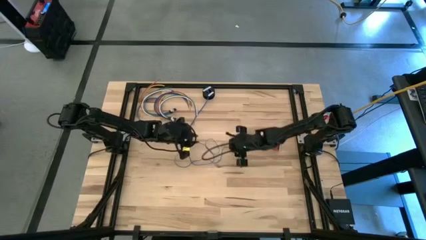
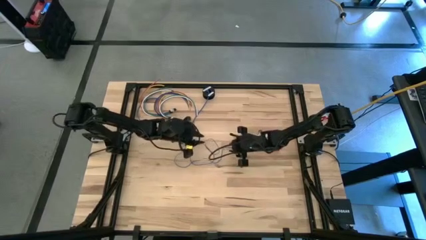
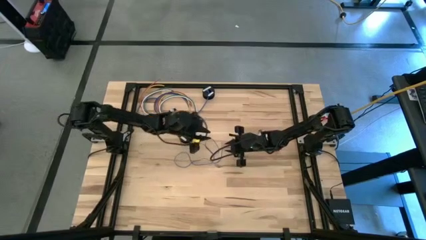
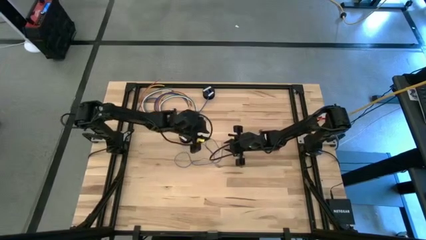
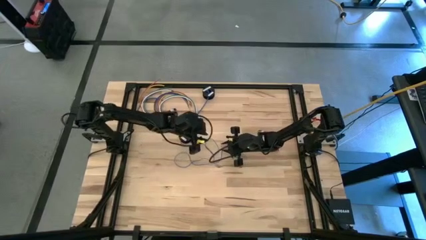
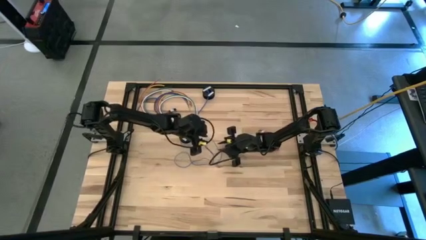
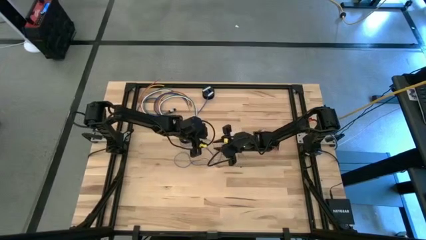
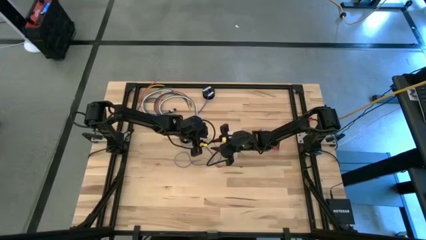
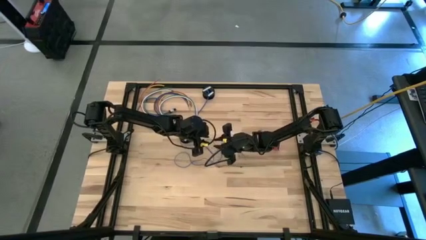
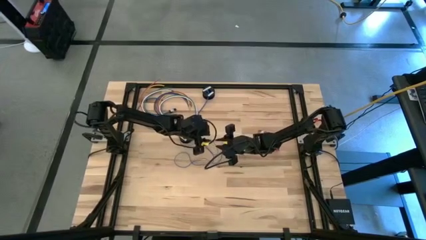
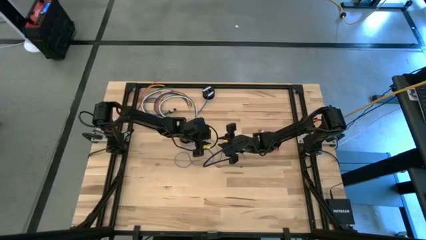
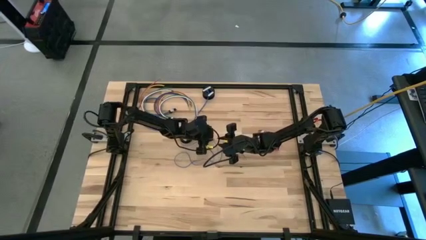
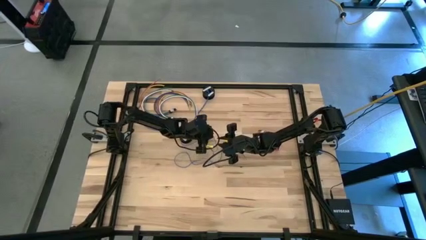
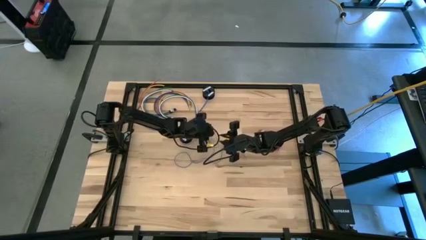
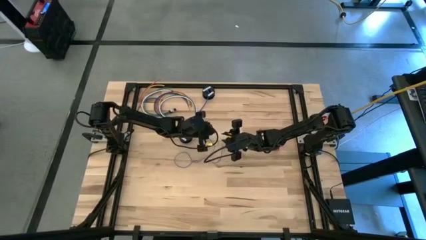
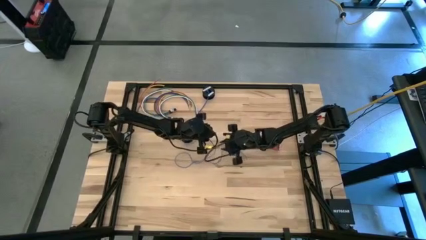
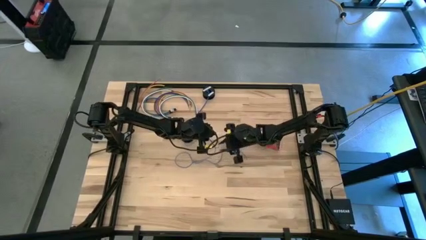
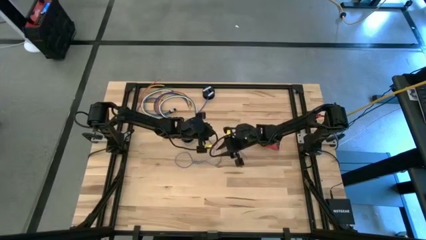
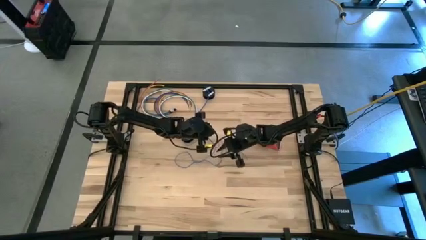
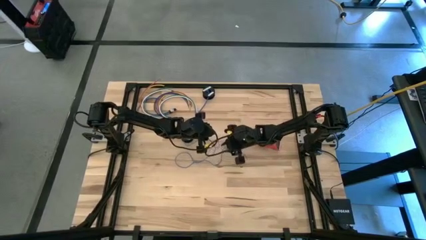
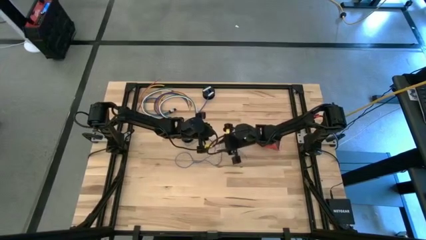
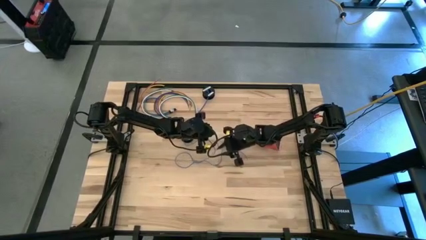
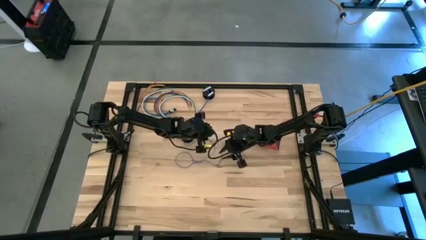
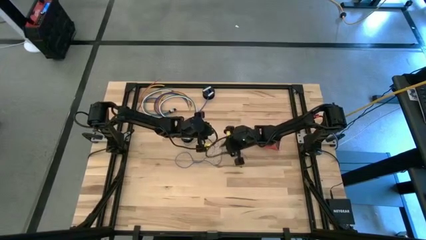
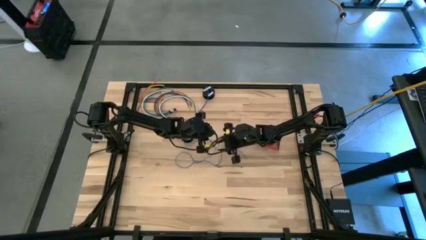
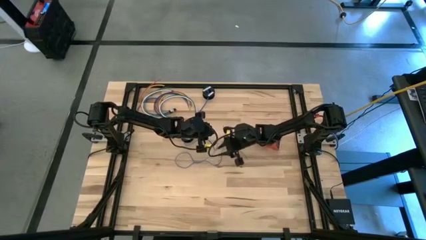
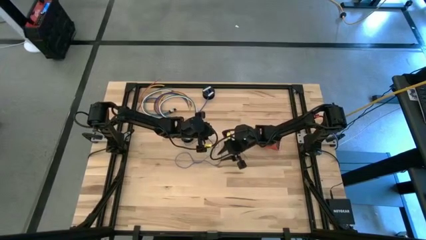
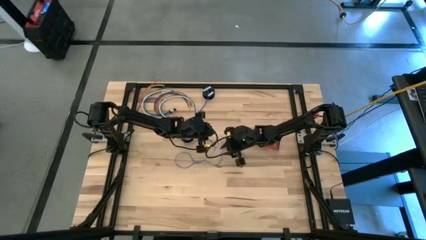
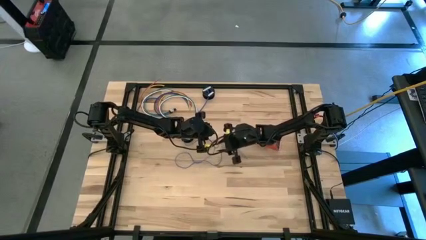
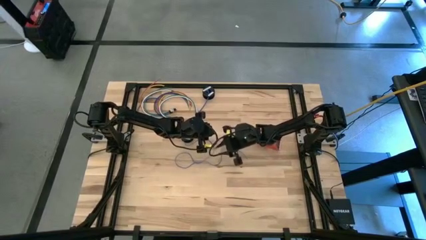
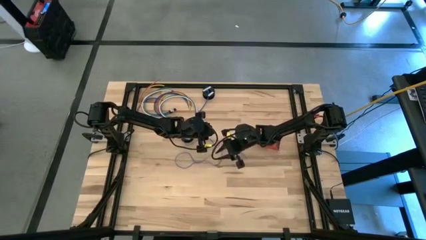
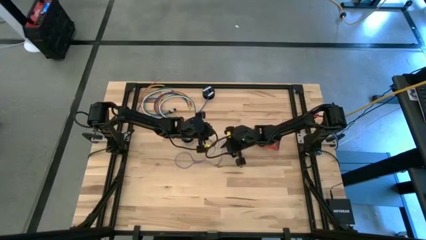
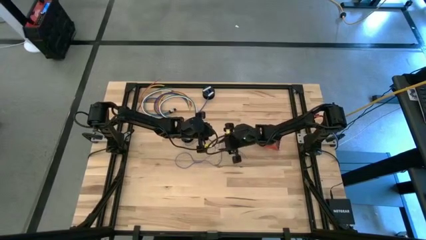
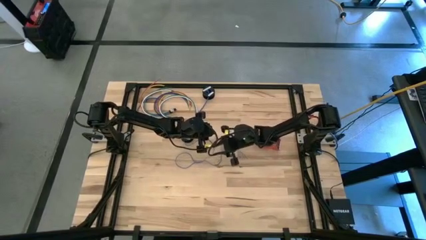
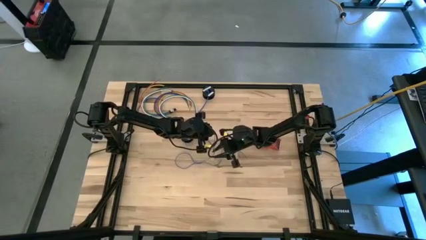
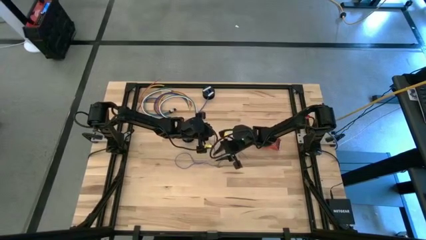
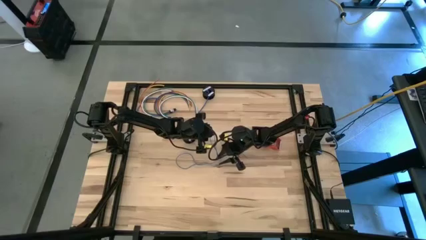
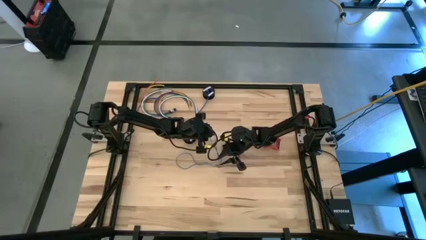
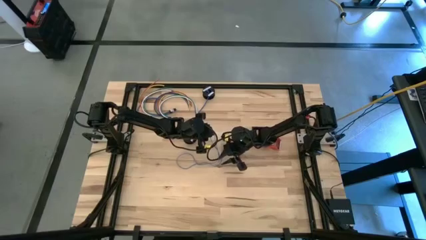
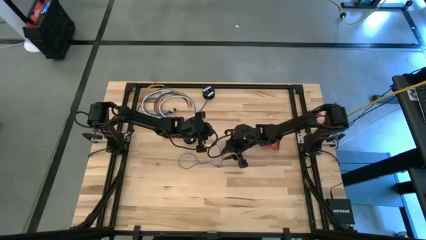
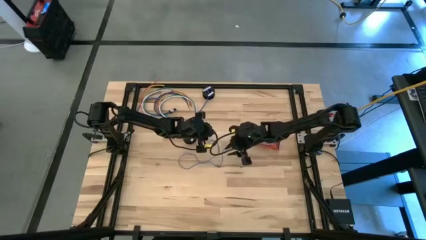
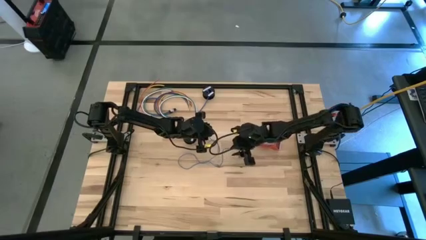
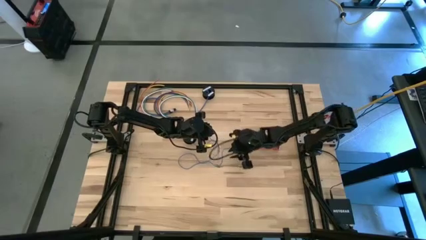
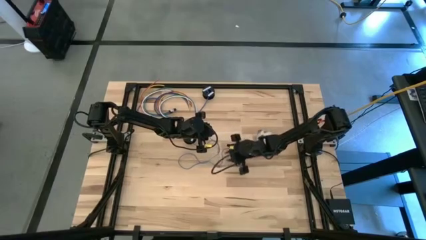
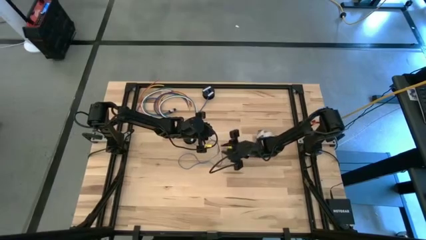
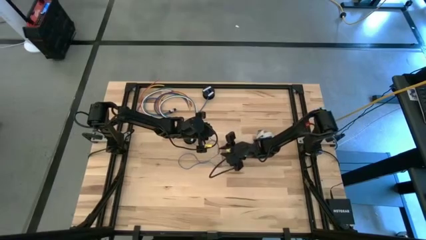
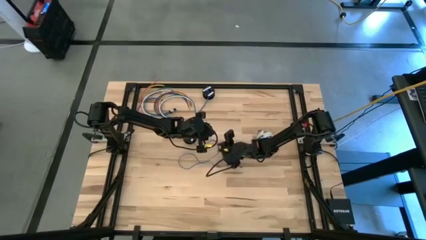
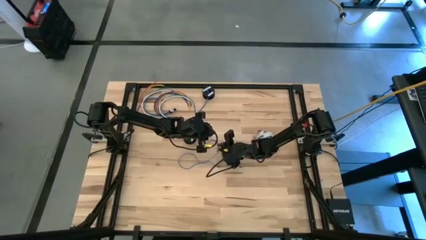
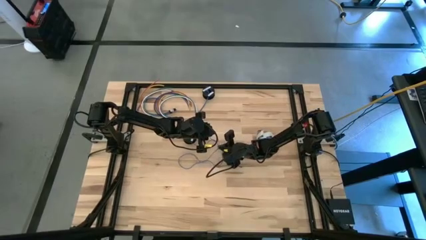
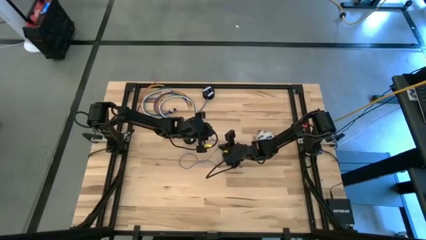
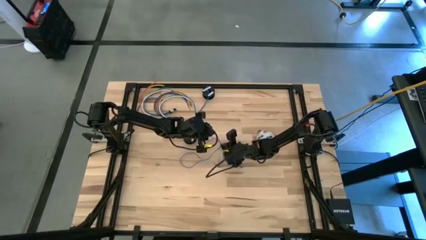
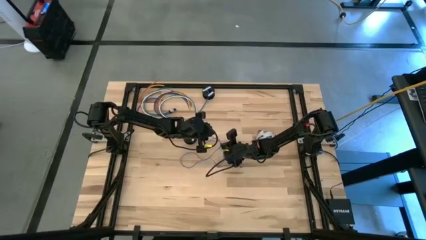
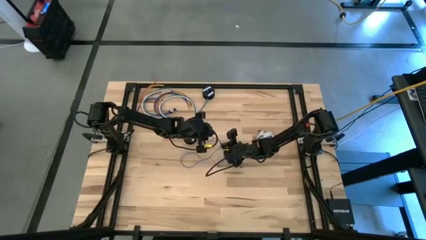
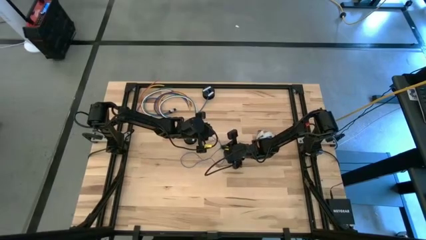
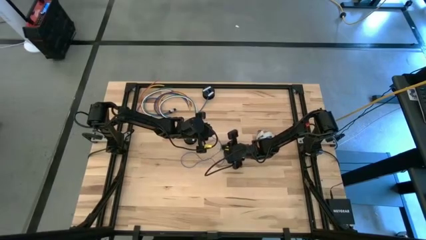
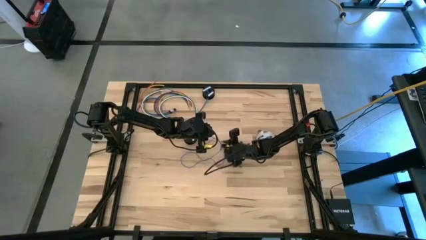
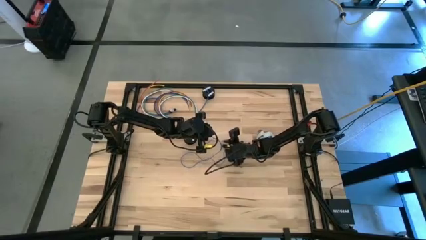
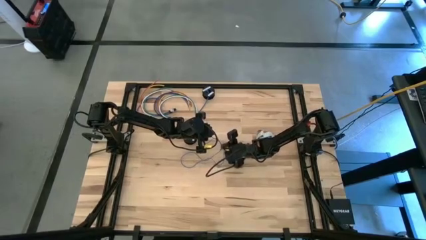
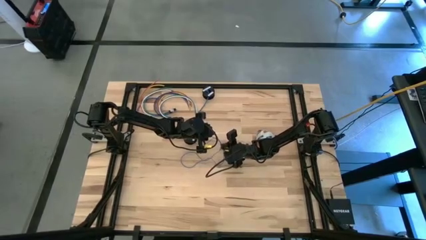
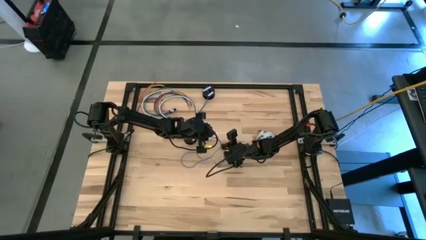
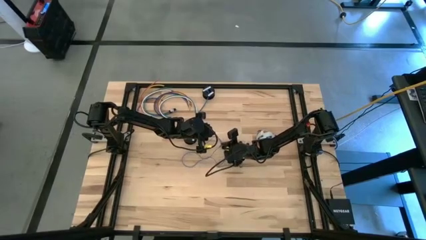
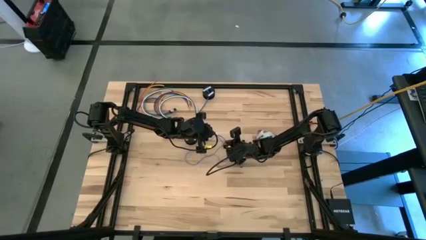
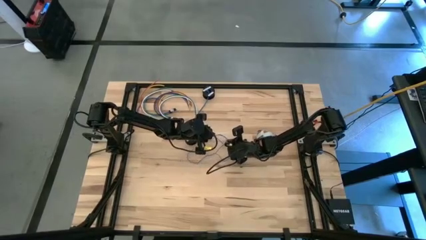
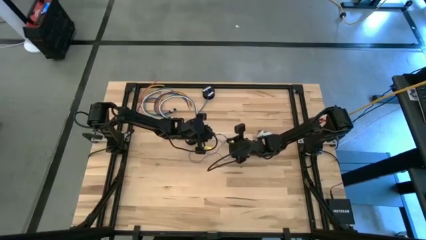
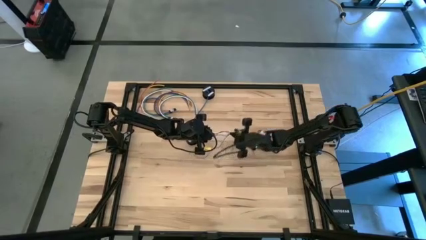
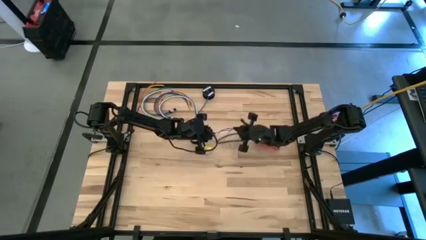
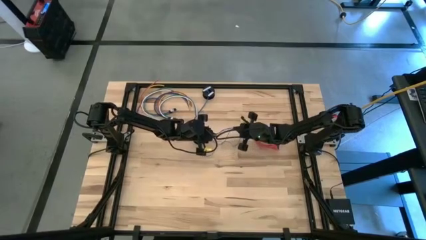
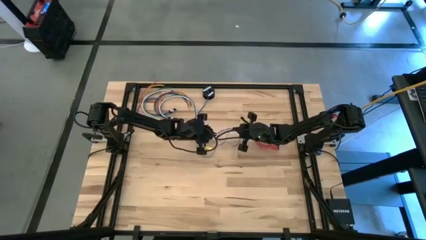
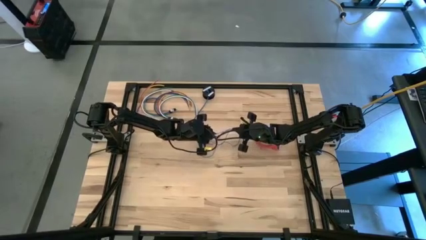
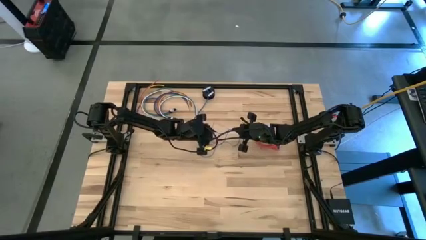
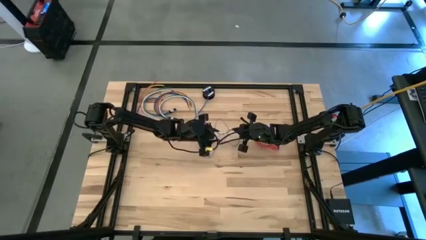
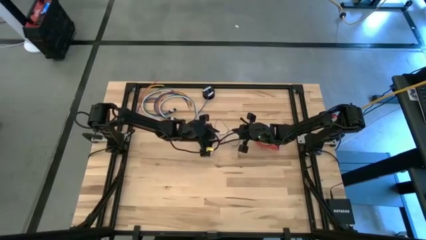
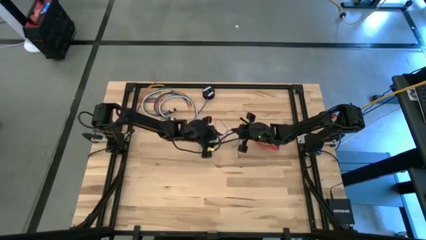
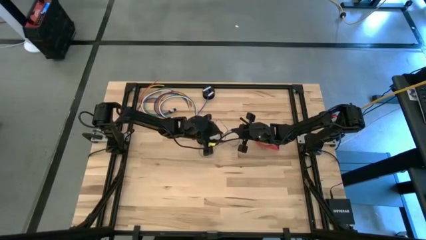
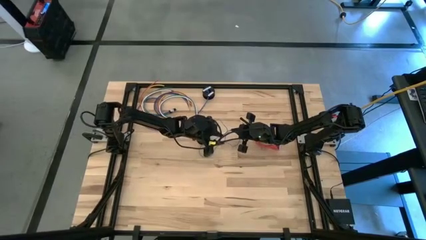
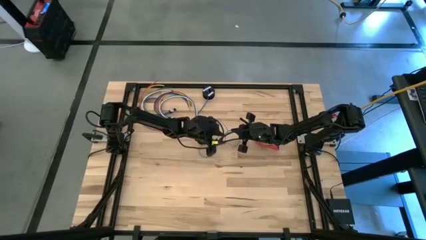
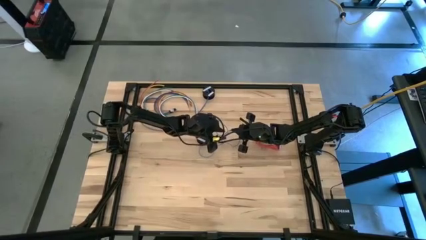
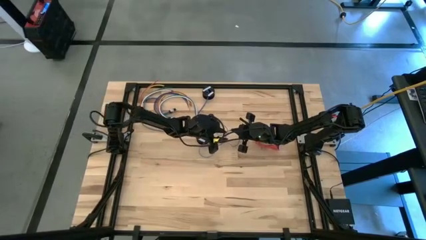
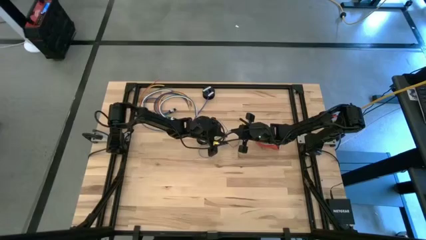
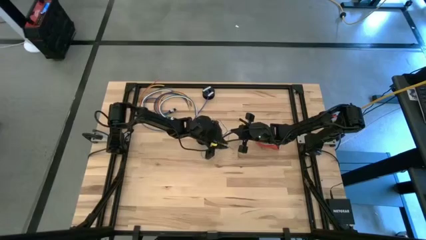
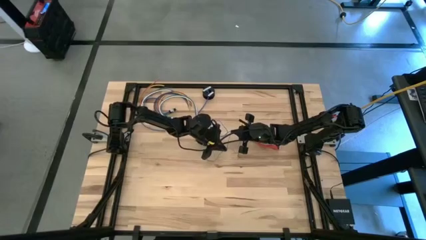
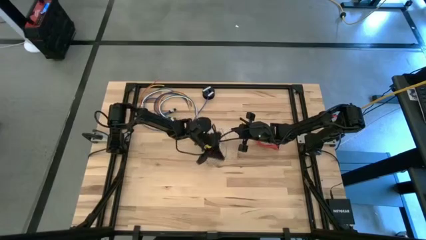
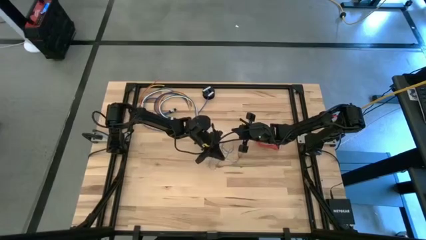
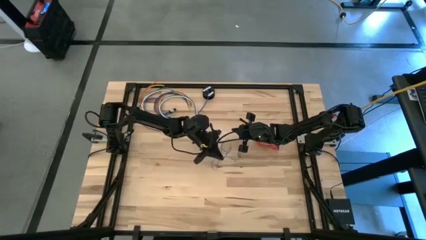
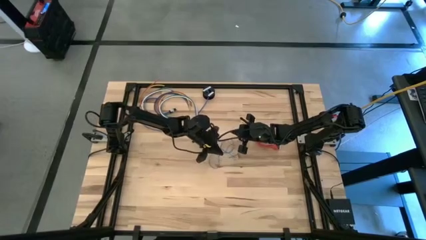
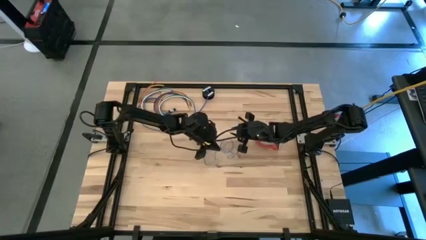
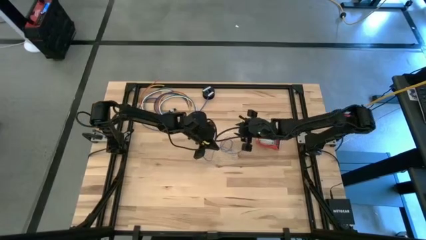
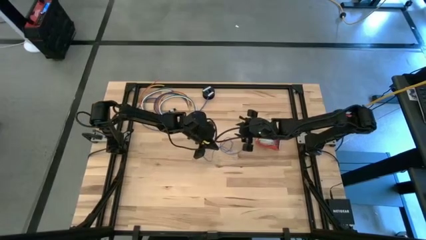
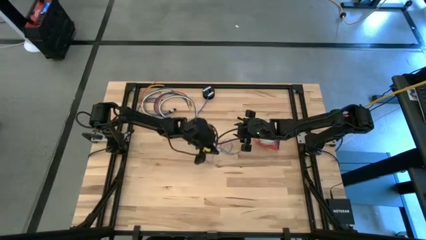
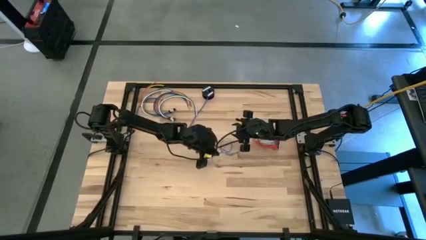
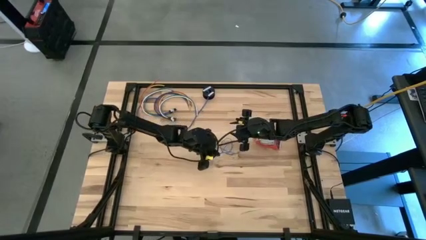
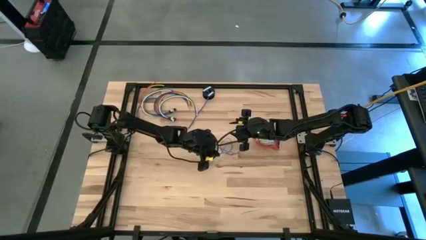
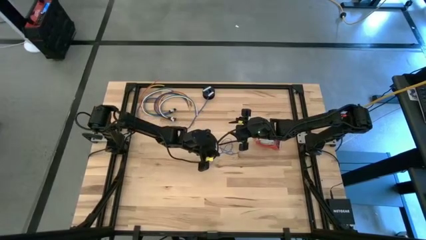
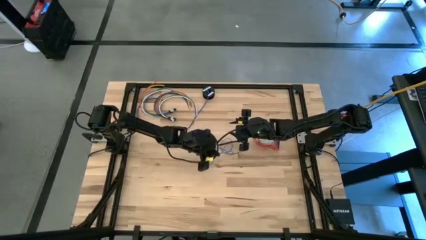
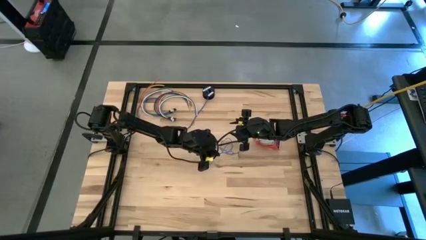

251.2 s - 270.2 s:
Task: Coil cords
Coil the blue wire onto the spool
